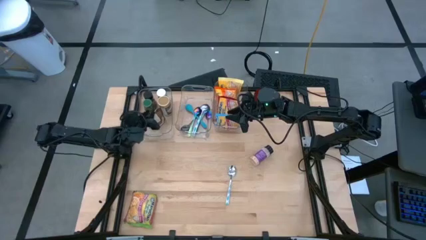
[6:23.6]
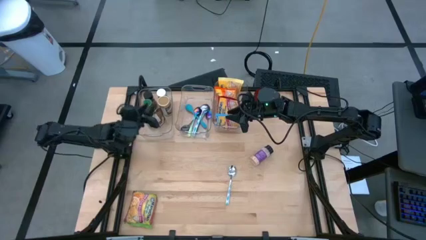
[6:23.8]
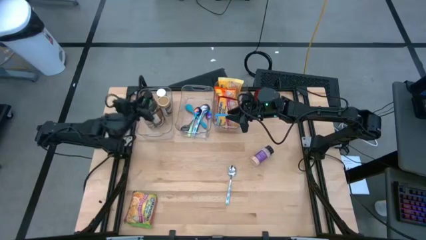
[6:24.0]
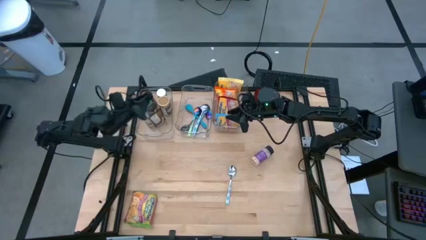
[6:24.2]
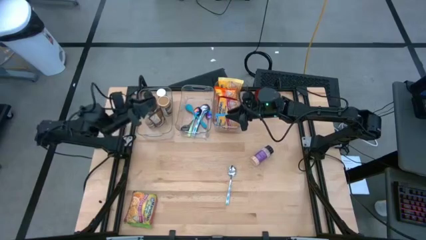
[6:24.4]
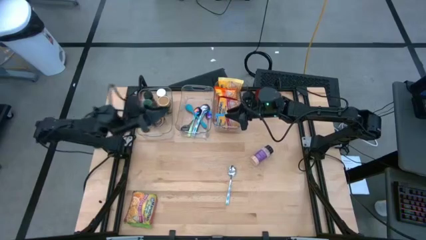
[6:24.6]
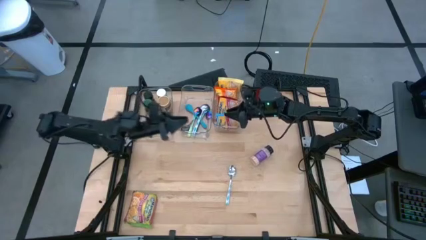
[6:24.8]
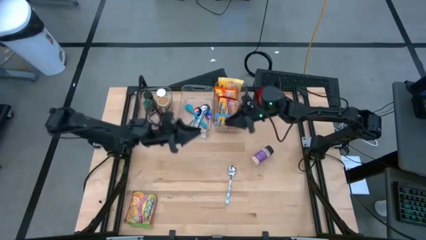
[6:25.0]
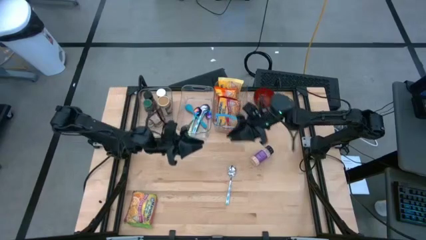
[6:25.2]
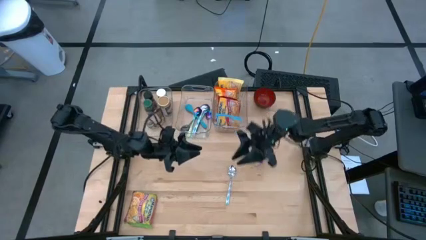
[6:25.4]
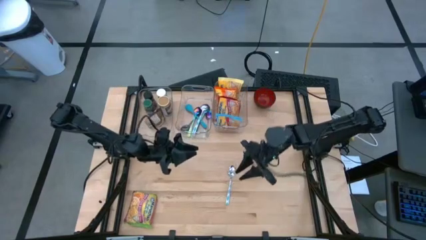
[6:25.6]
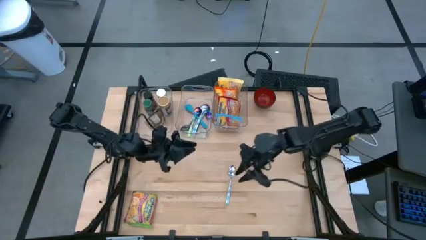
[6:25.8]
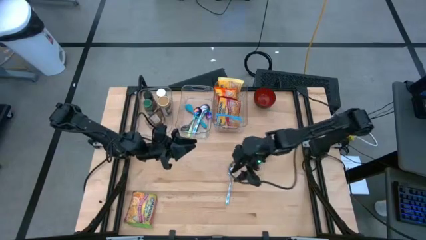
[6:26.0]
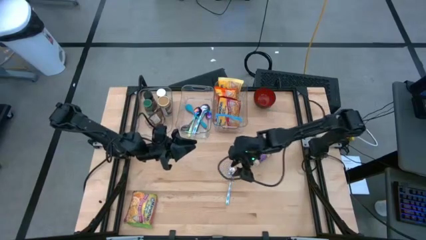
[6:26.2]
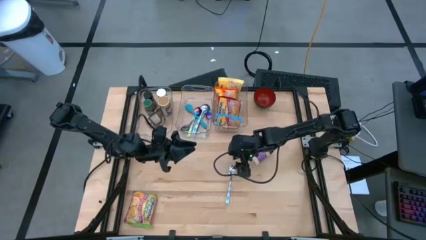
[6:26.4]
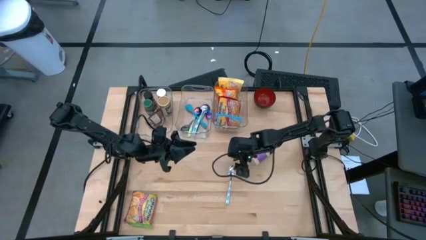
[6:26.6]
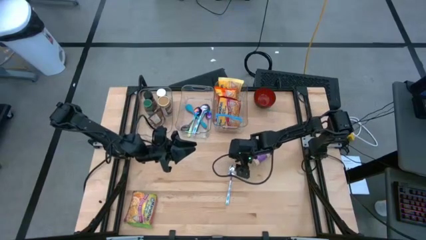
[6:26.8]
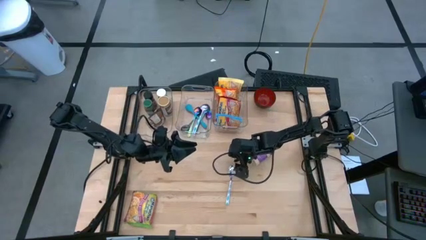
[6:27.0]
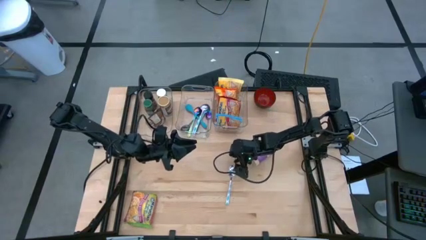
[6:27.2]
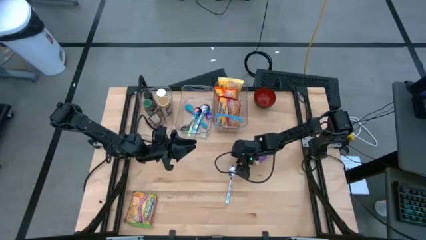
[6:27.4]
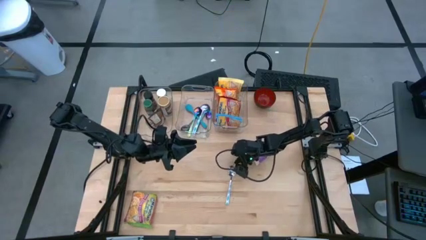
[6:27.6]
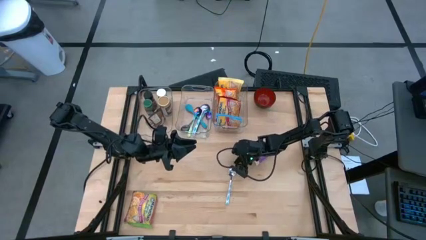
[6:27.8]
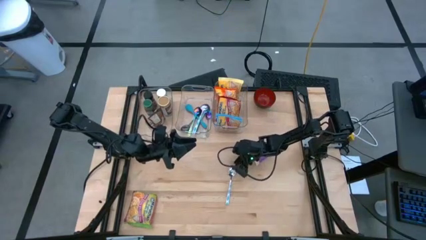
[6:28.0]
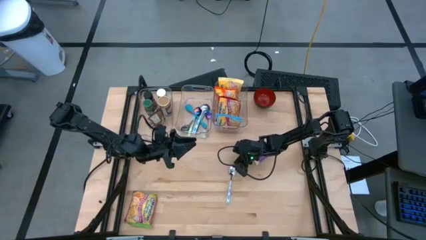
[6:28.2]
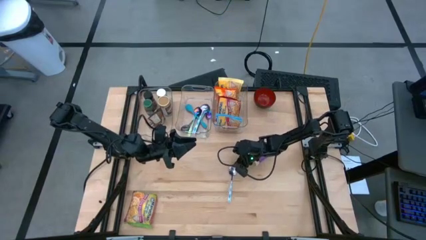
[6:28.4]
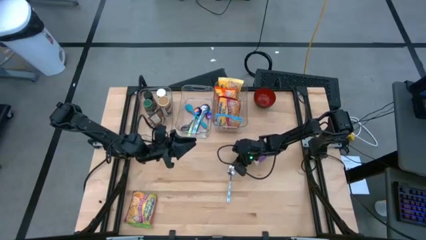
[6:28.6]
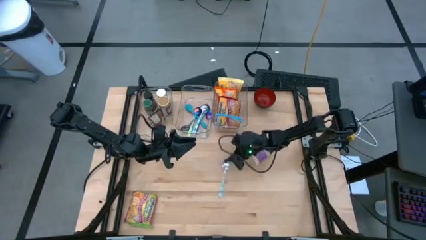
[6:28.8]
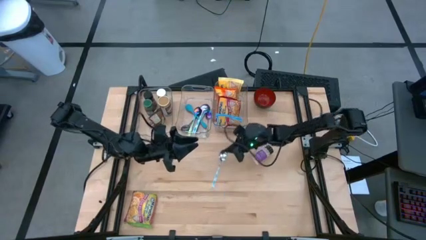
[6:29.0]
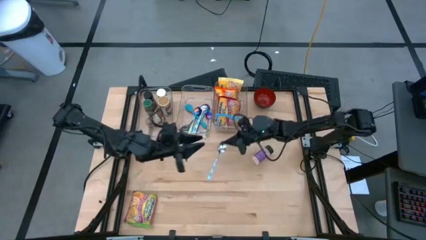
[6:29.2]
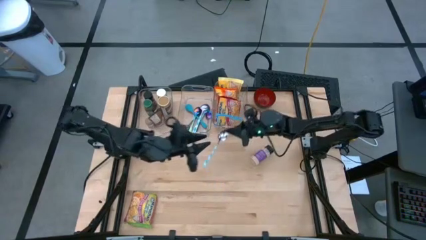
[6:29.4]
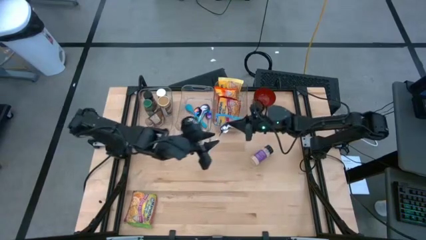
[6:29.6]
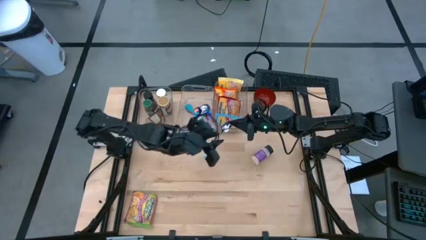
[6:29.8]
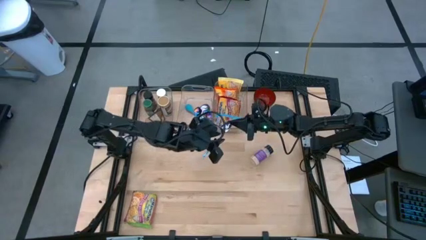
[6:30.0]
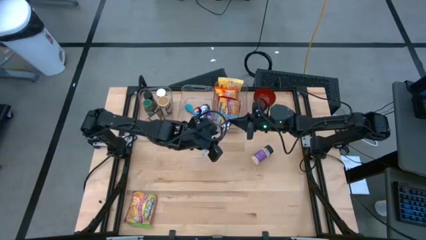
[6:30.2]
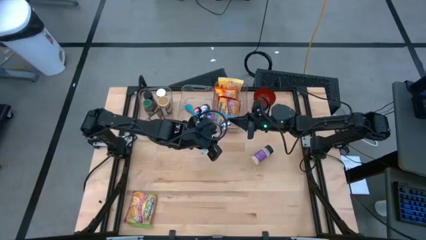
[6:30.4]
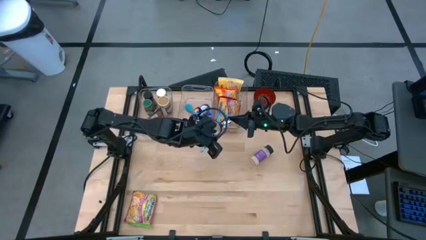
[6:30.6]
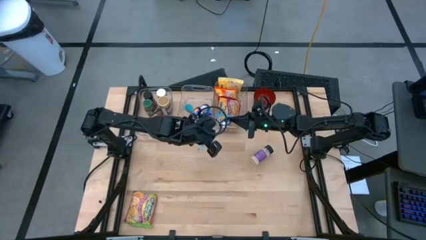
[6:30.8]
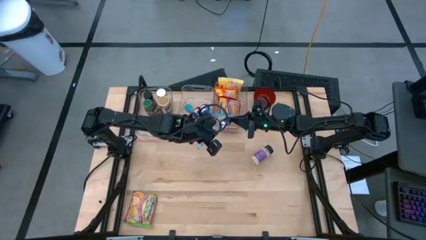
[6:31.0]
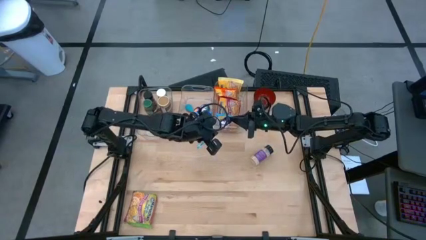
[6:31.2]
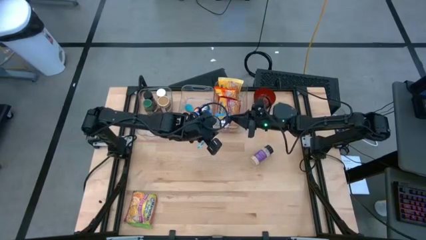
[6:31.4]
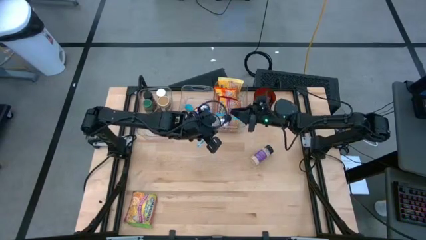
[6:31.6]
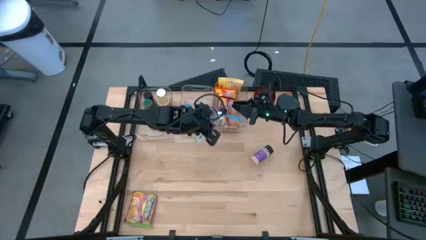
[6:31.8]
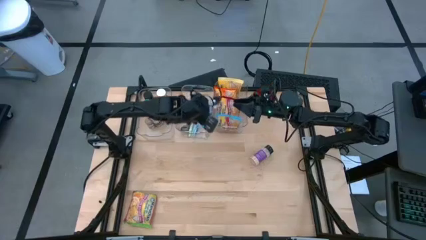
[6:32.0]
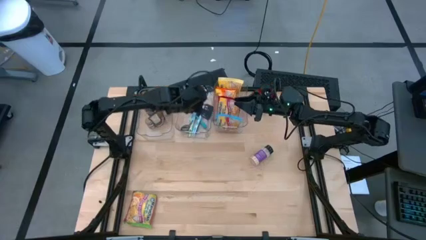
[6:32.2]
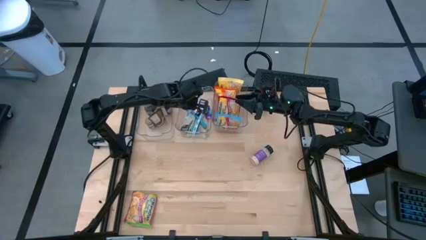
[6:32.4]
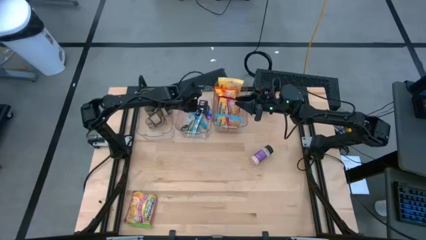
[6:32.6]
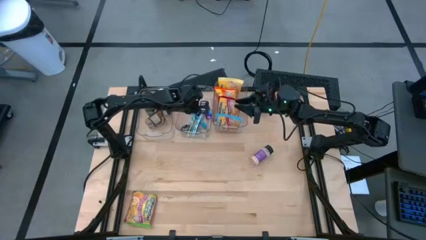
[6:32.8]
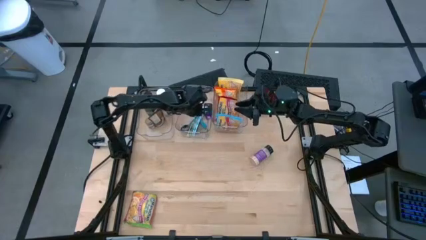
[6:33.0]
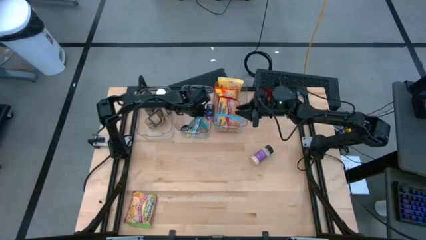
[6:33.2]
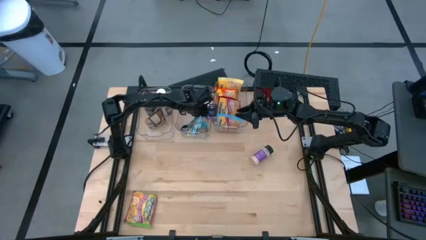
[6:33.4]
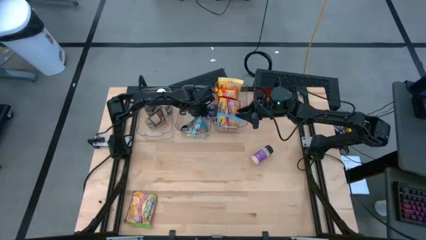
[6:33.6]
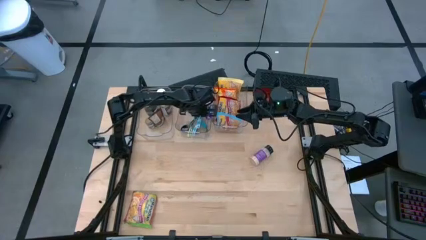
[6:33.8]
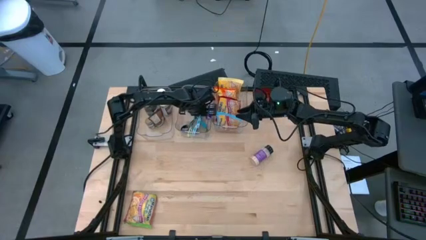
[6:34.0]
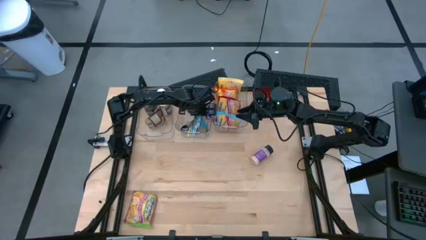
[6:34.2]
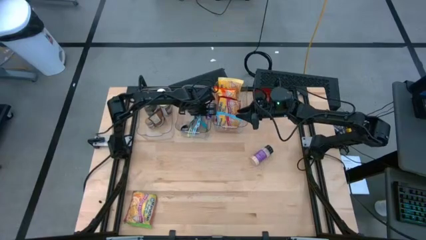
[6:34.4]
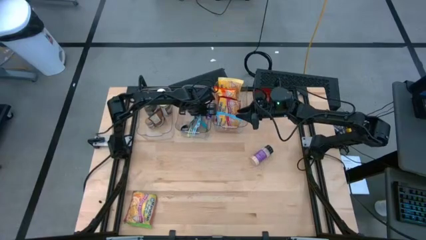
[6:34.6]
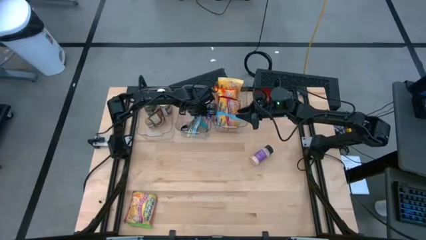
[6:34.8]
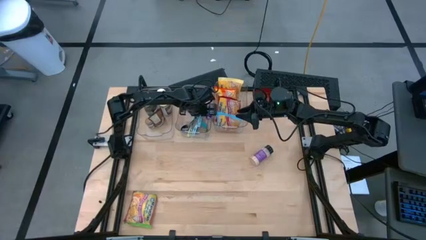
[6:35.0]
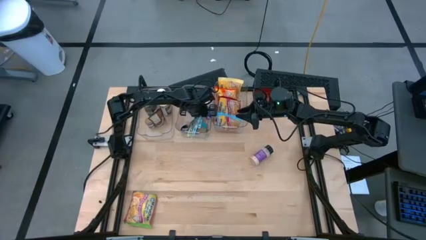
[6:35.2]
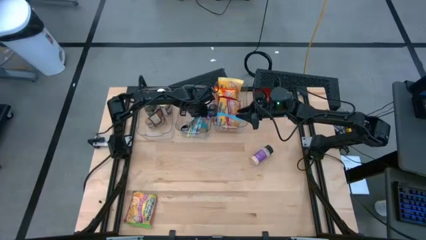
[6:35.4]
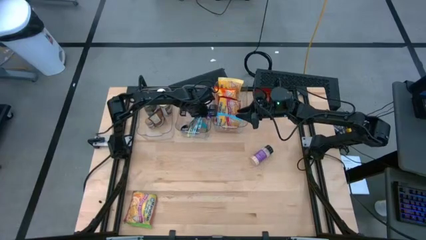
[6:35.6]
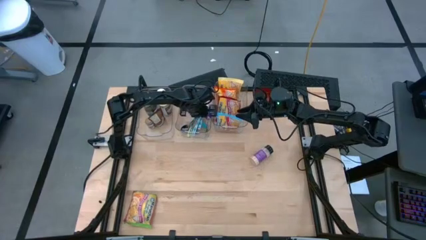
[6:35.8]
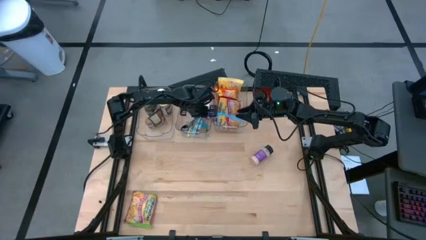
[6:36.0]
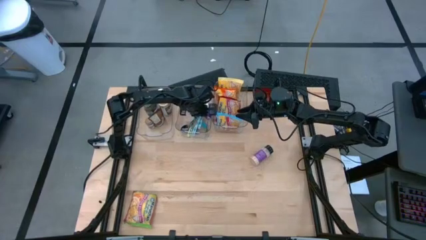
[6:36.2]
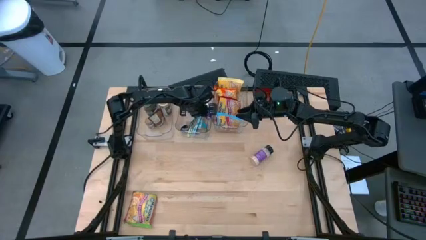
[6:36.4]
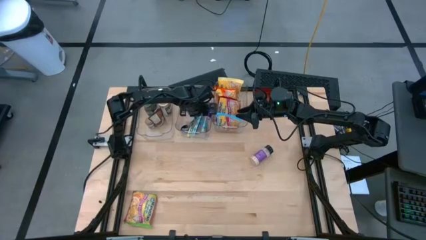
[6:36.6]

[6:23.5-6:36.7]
Task: Pick & Place Food Item
Put the blue spoon into the middle transparent bin
